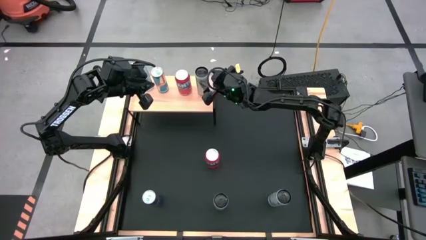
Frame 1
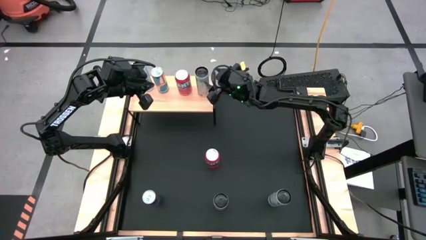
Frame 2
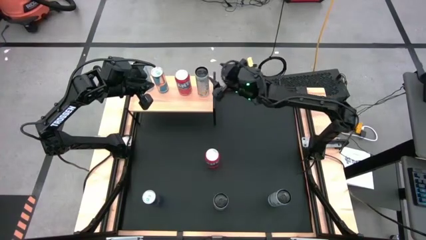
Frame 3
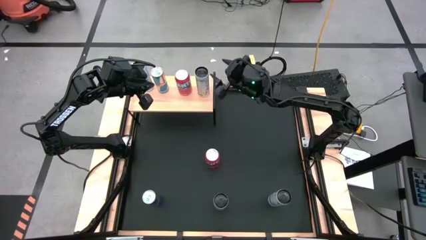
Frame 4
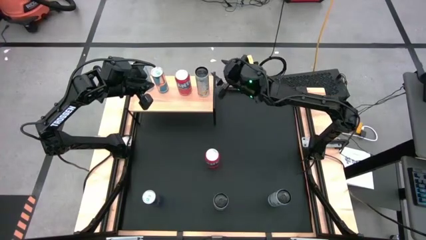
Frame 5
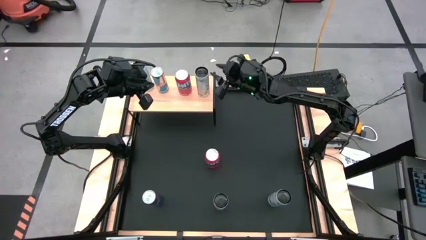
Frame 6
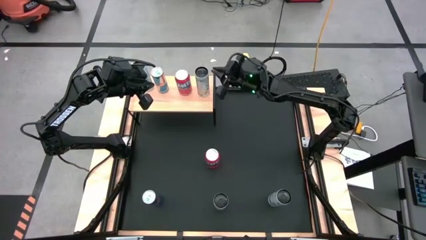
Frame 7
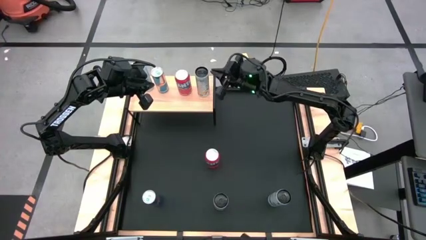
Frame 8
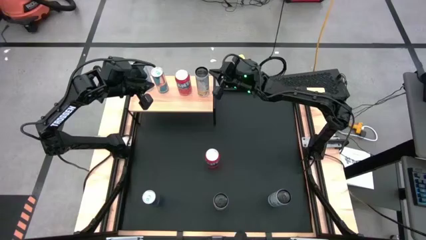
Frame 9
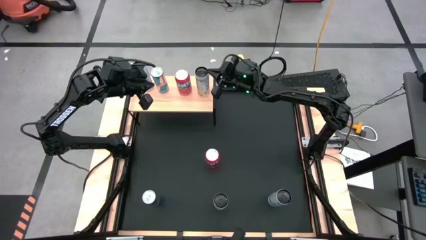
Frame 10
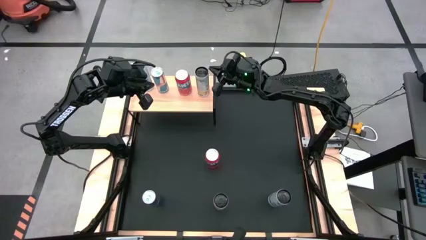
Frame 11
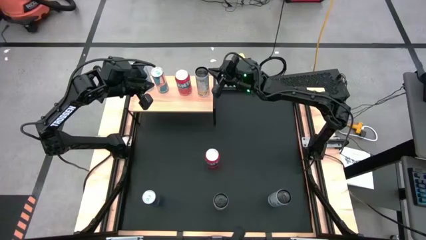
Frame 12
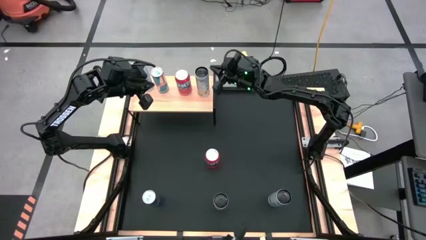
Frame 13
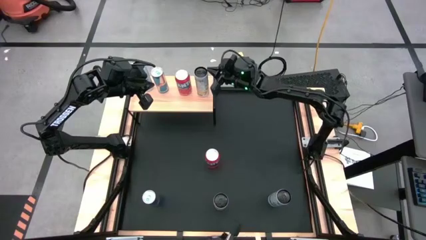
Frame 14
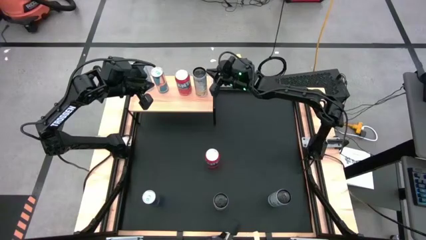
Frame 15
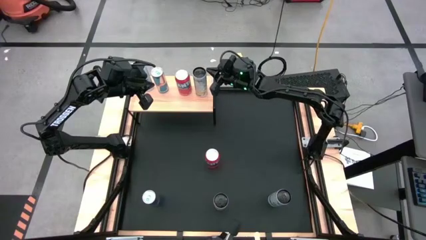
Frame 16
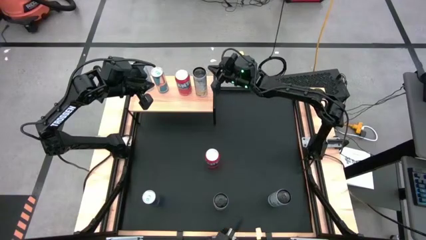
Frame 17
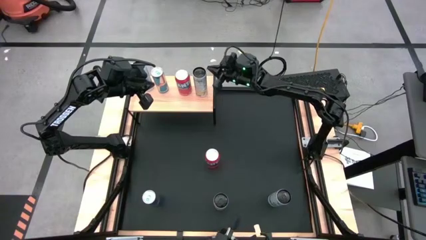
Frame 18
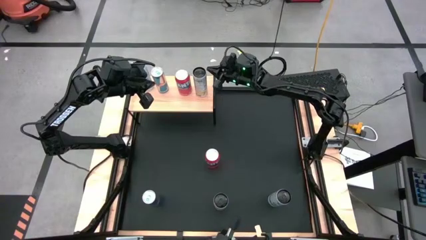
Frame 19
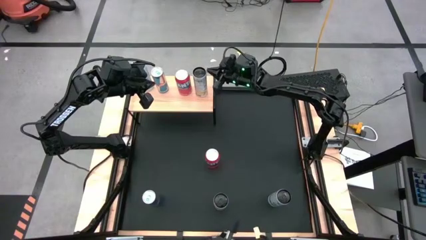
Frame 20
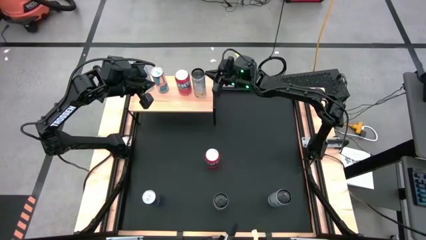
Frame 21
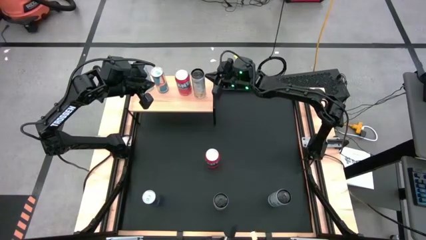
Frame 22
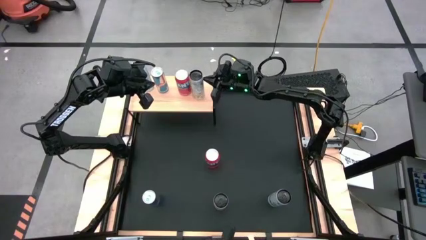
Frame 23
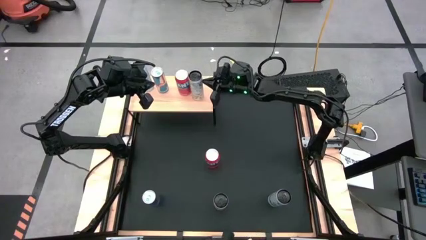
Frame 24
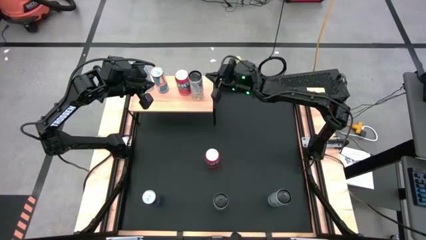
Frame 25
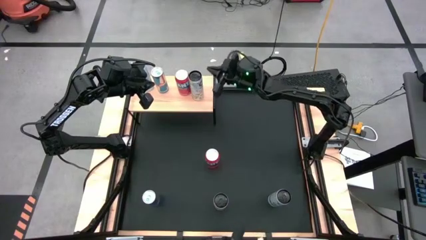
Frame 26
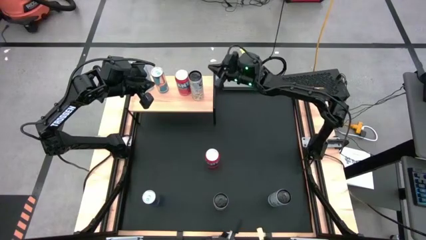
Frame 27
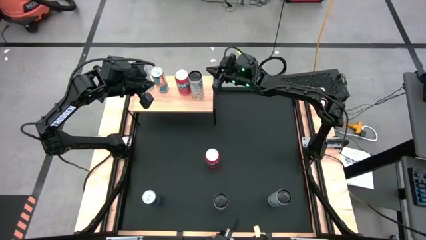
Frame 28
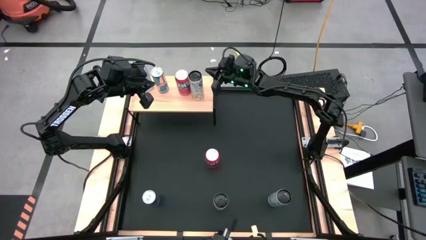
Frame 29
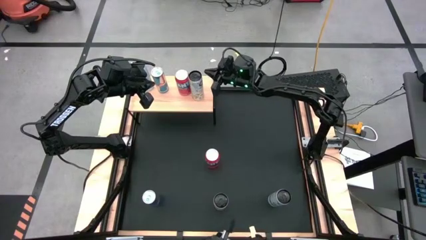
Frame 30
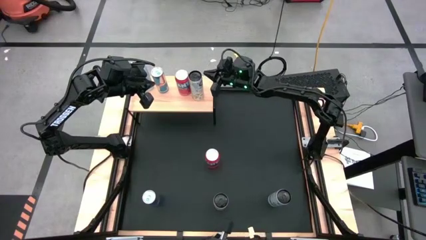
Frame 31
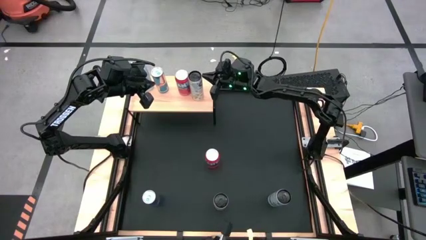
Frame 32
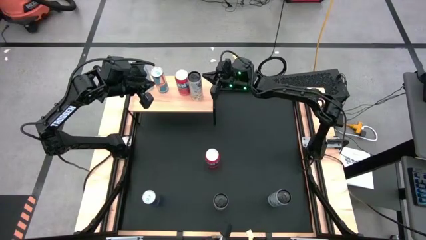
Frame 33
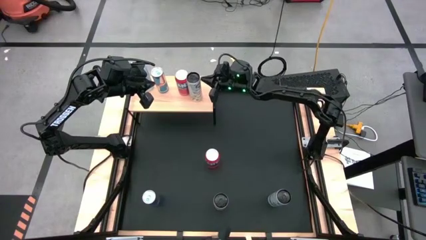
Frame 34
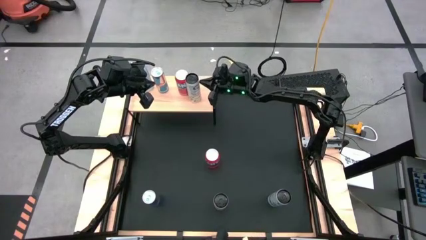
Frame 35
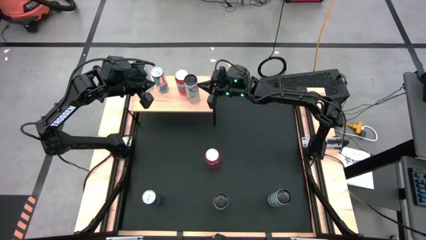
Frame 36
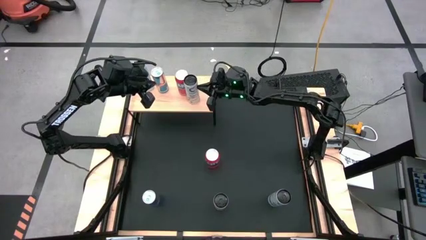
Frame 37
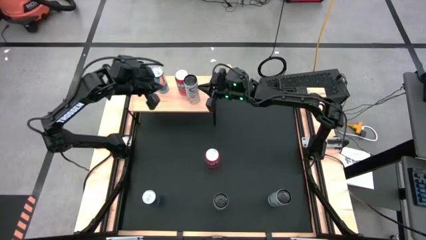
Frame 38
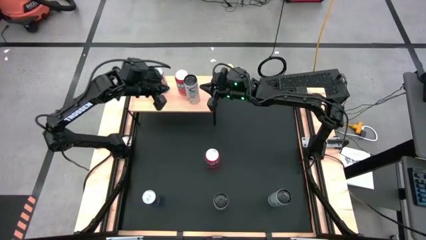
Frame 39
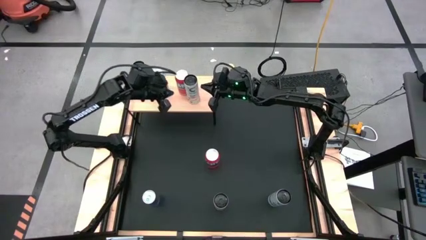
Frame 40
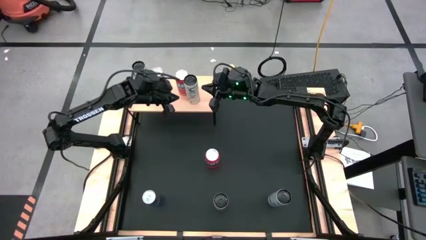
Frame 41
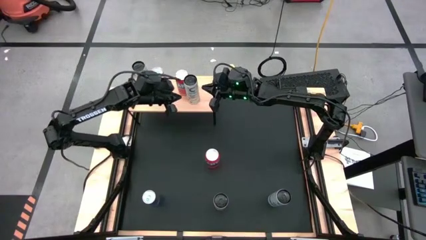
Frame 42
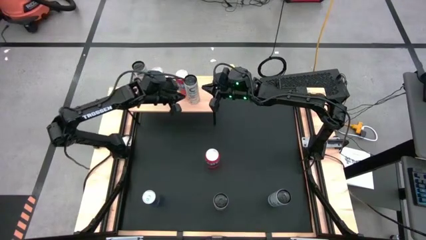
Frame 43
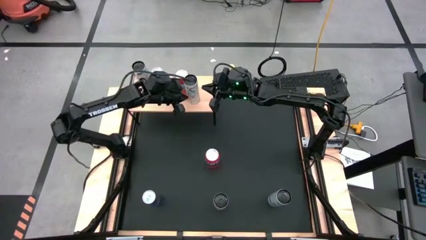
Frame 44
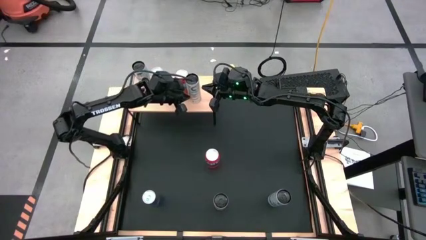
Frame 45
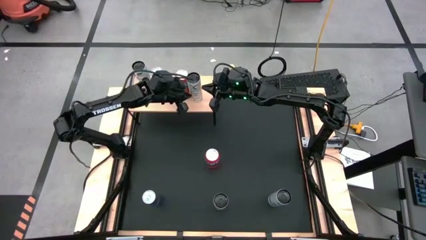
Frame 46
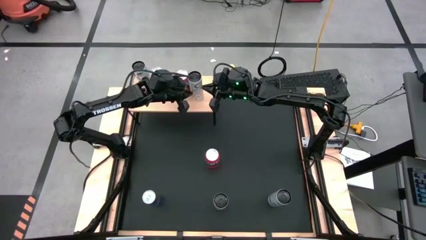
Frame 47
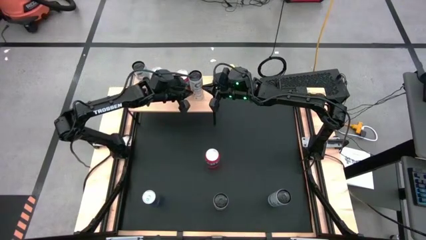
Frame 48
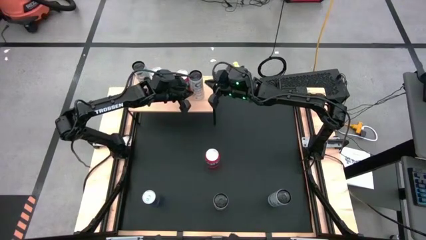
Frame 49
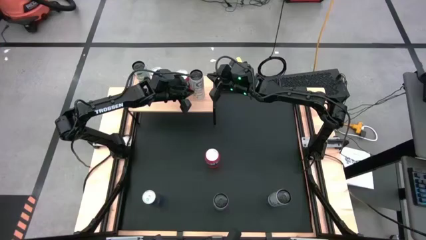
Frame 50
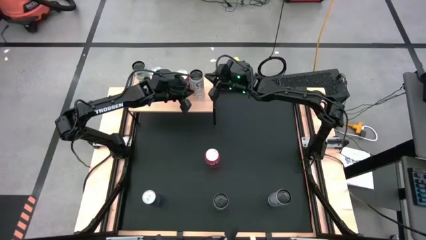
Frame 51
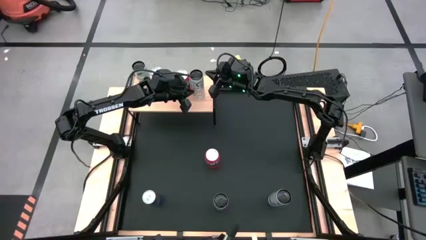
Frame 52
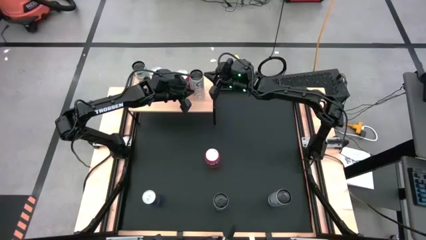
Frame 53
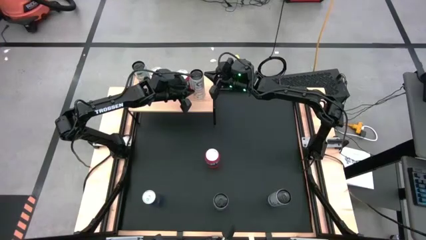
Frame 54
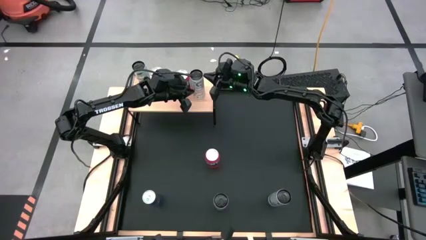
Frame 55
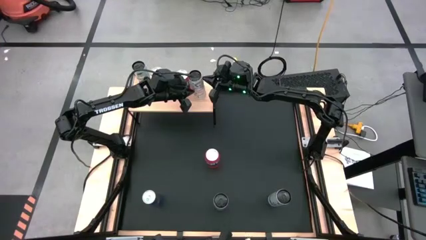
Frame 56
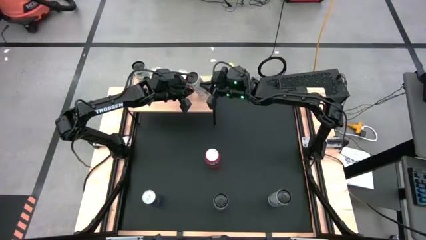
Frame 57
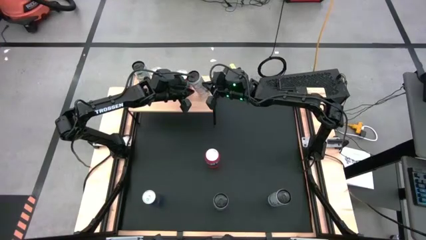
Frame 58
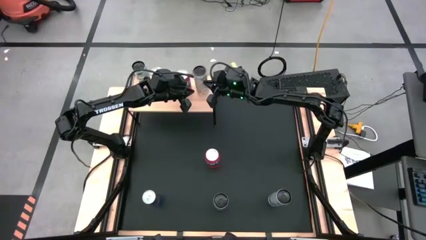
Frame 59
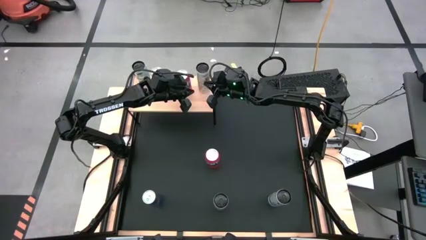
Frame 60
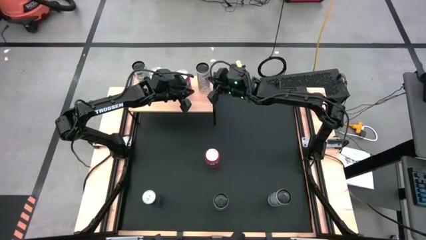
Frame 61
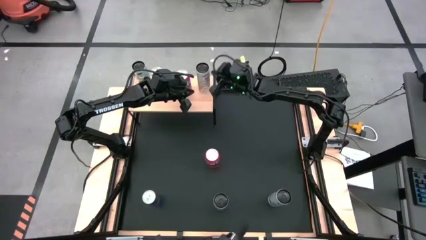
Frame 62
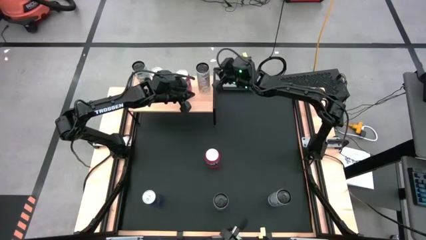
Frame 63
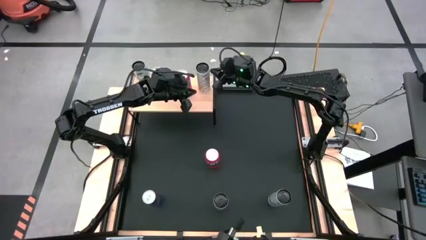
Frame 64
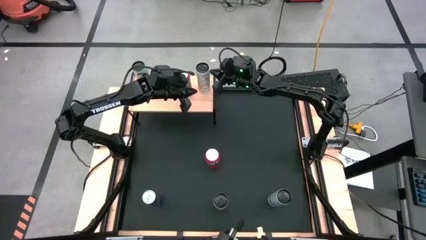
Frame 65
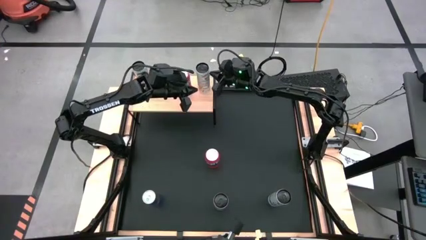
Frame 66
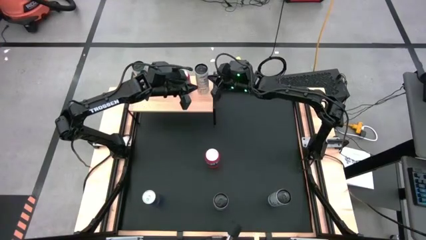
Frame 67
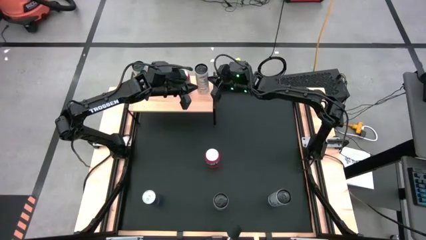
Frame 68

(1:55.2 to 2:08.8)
Task: Place canned beverage on shelf
Put the top white-yellow soda can on the shelf
